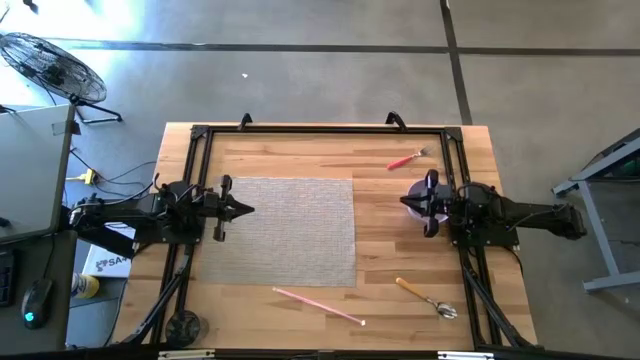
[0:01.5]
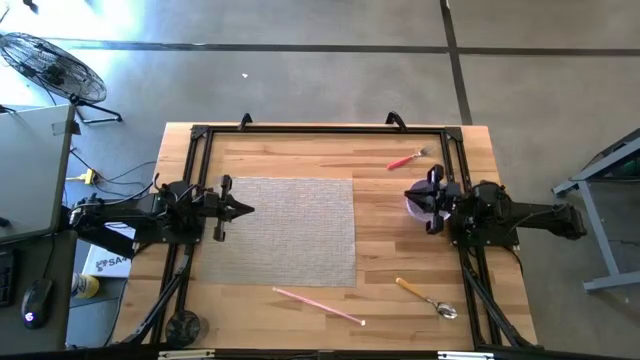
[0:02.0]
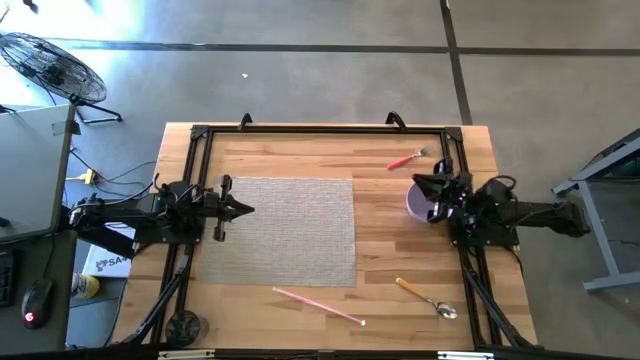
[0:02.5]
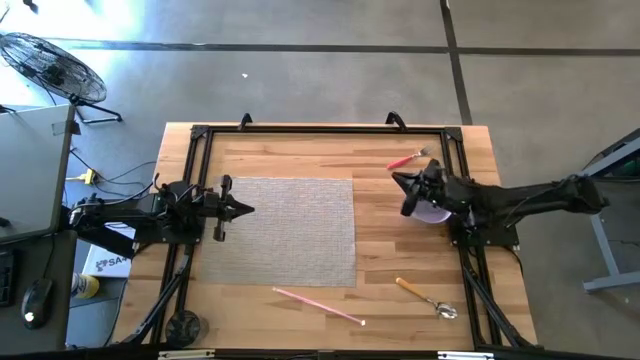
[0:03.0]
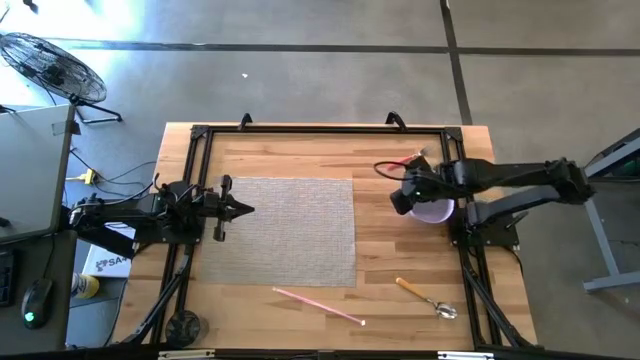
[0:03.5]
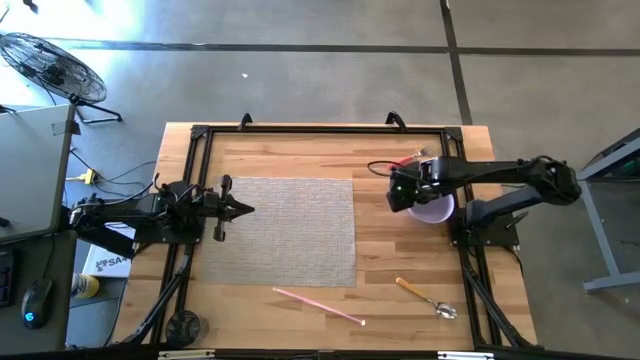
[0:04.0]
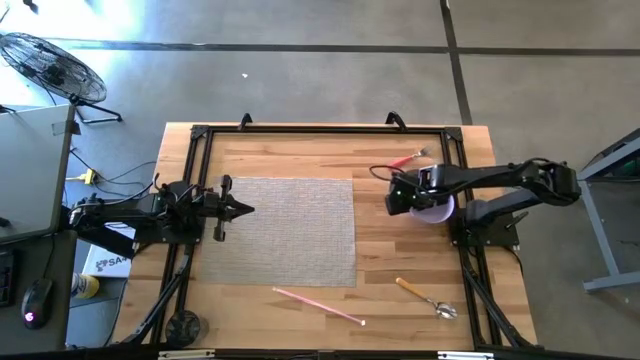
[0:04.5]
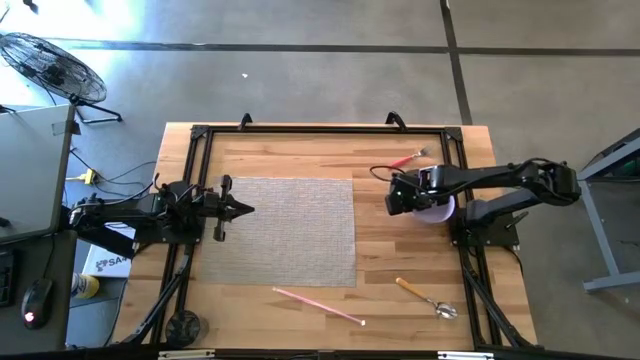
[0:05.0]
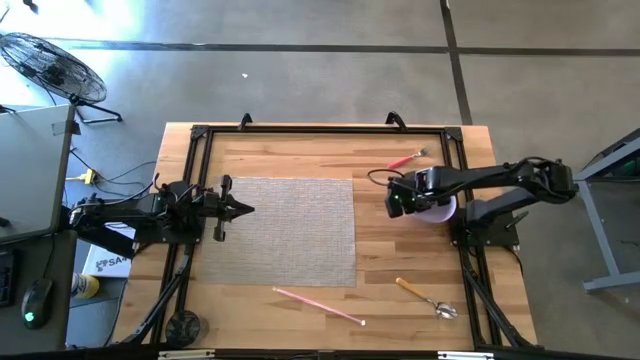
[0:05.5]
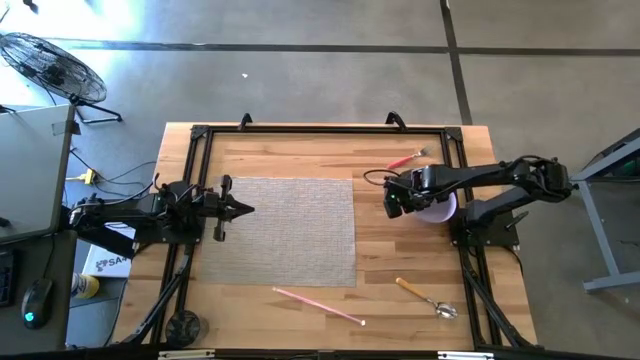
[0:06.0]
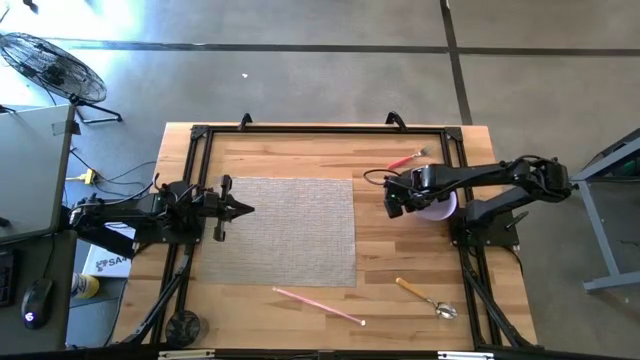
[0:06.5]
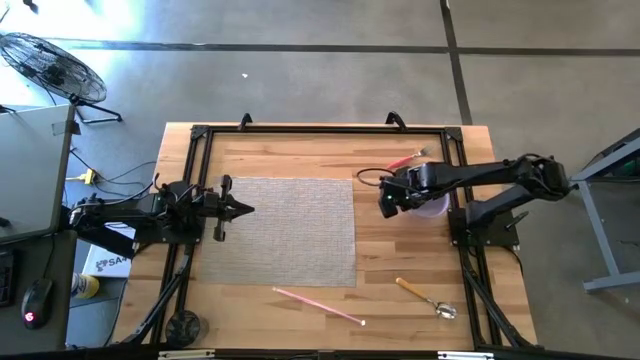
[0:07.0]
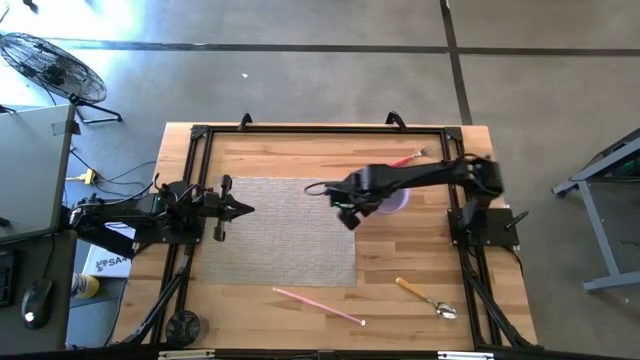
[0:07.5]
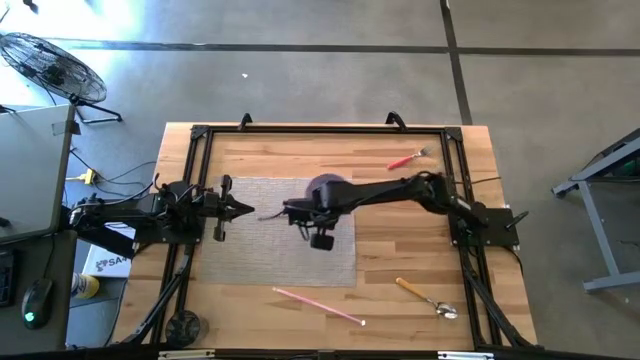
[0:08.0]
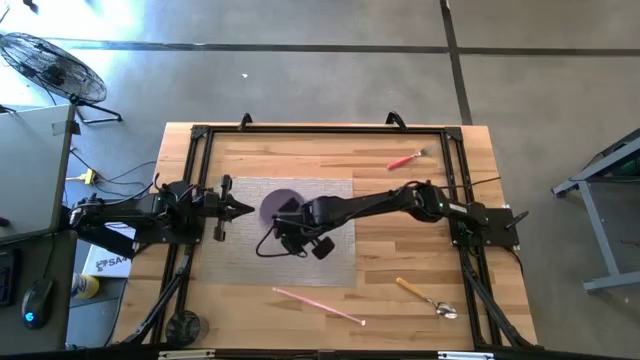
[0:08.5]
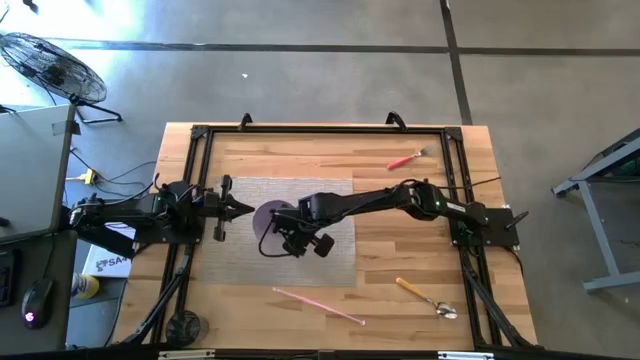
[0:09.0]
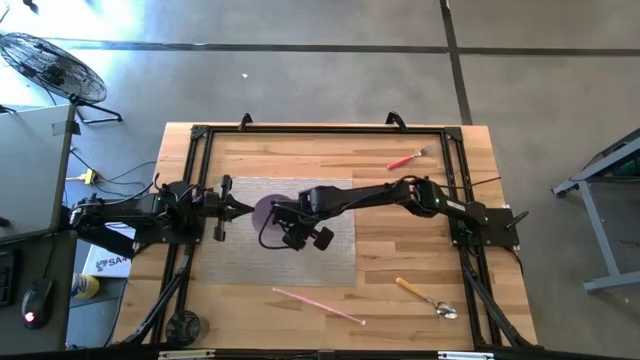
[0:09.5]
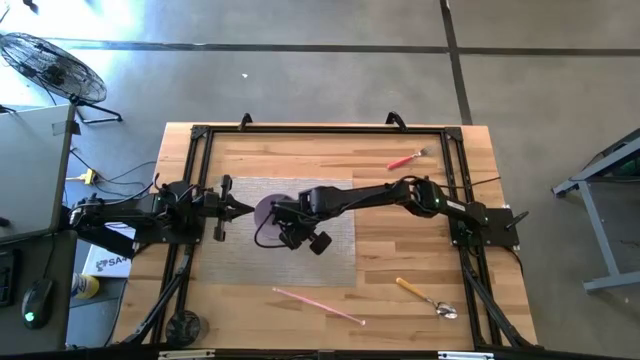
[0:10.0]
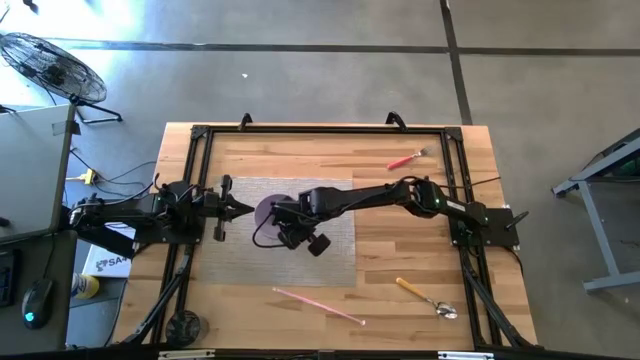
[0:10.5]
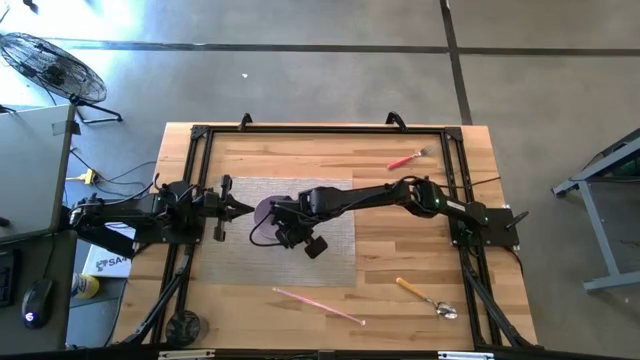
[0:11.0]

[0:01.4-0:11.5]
Task: Pick & Place Utensil
Put the purple bowl on the center of the brown placemat

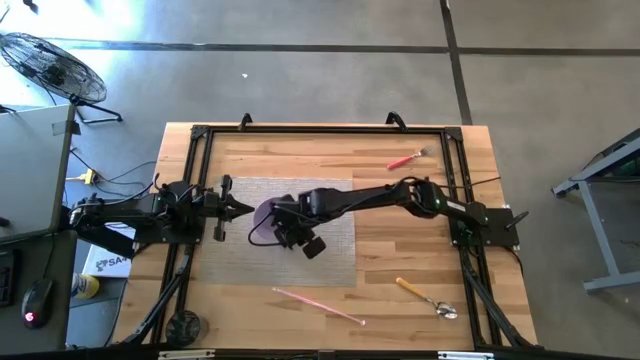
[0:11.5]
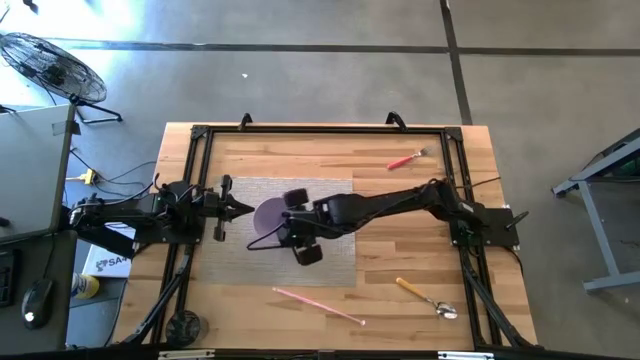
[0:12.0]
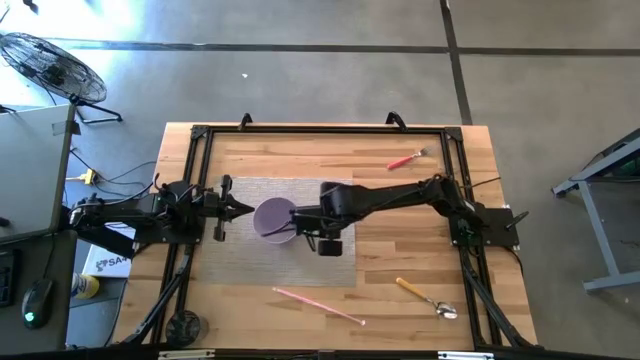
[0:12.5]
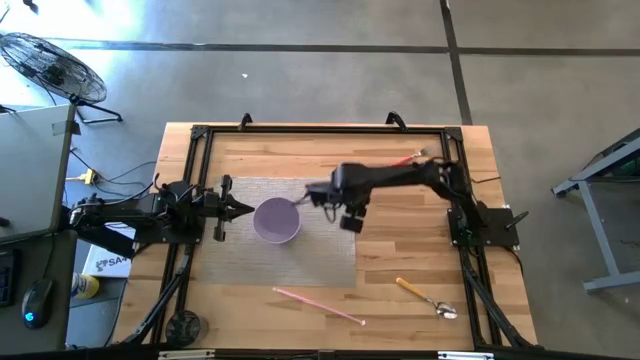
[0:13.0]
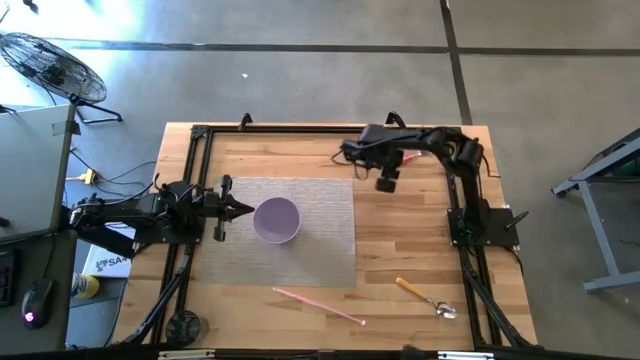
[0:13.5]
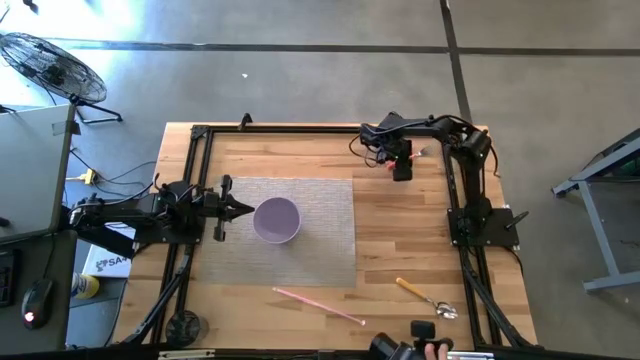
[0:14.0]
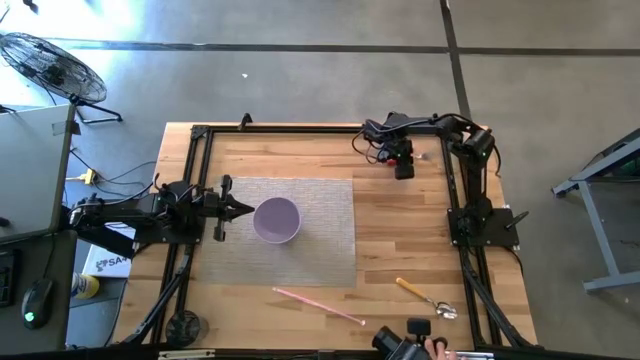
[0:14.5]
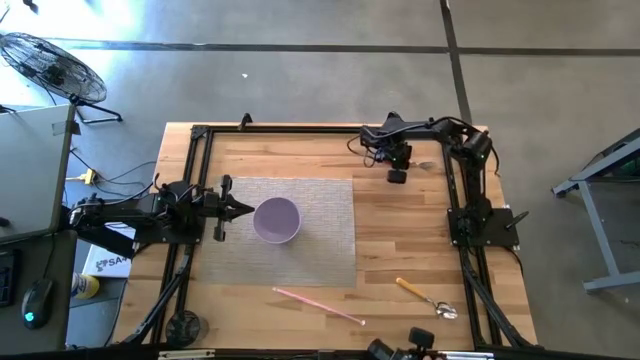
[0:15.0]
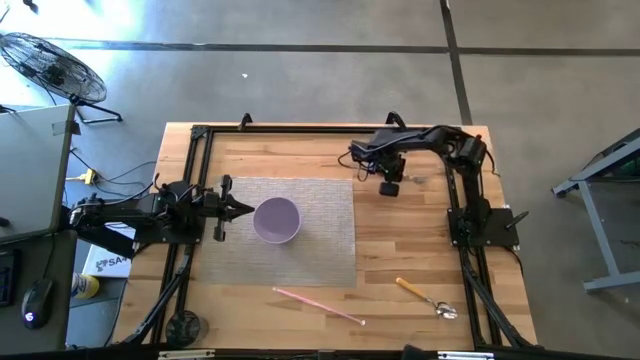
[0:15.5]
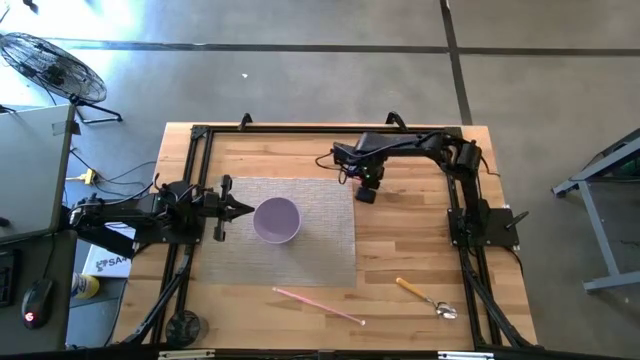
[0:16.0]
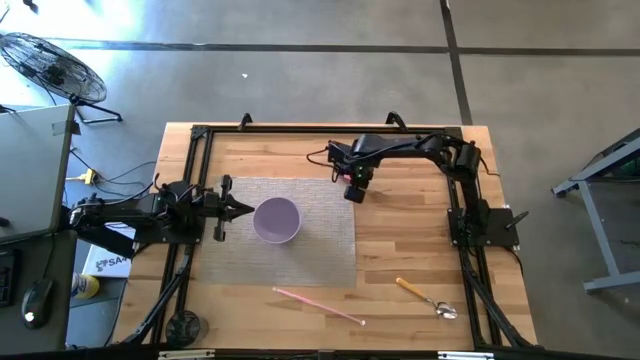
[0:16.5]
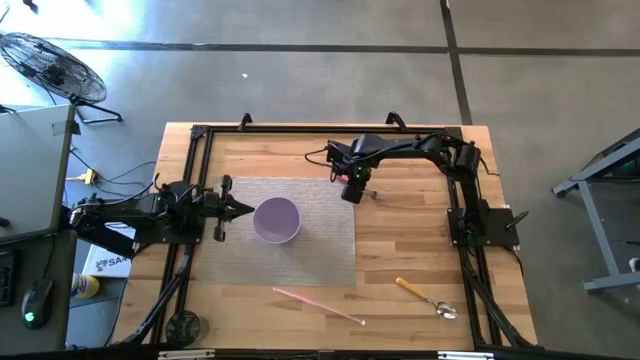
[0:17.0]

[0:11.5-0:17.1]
Put the pink fork into the purple bowl on the brown placemat

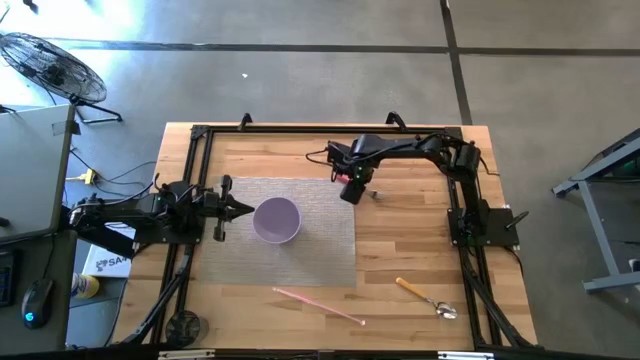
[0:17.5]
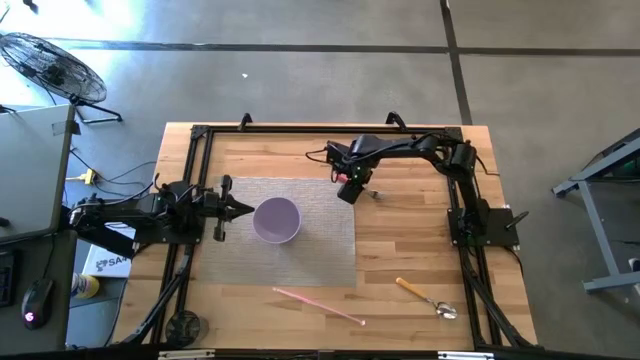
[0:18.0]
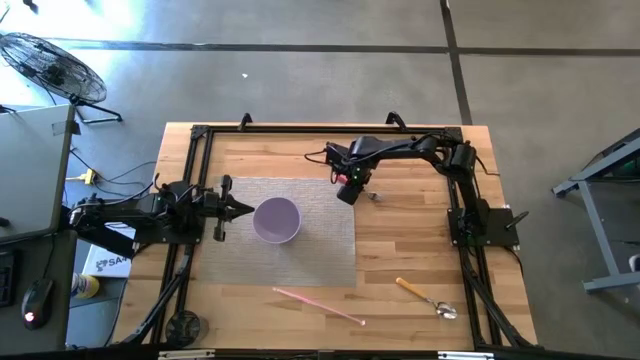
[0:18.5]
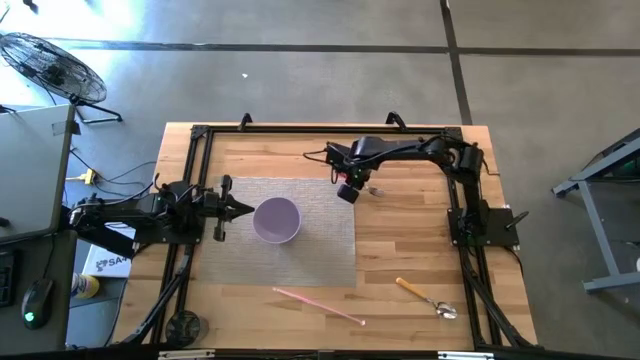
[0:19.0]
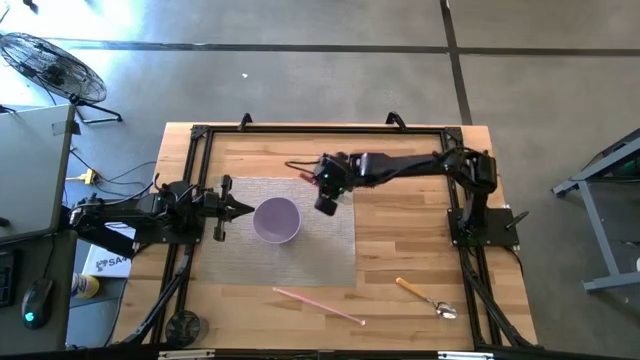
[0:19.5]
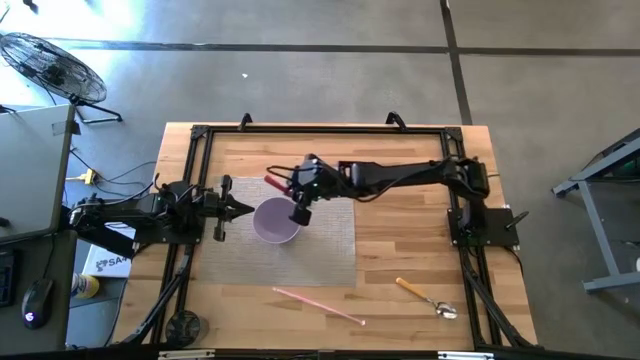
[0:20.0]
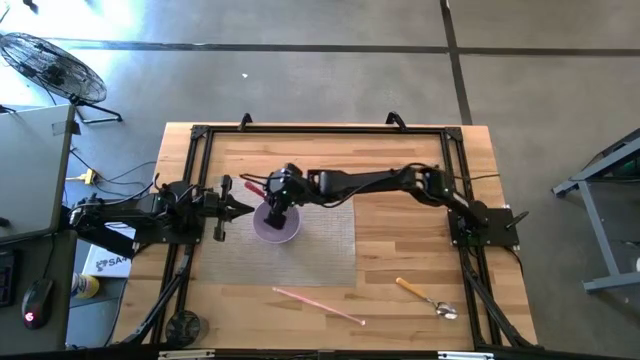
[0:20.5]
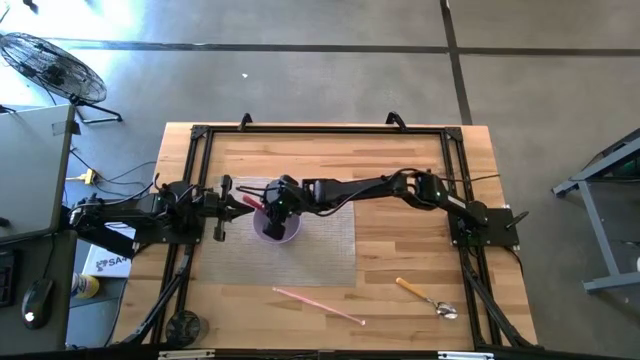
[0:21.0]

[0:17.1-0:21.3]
Put the pink fork into the purple bowl on the brown placemat
